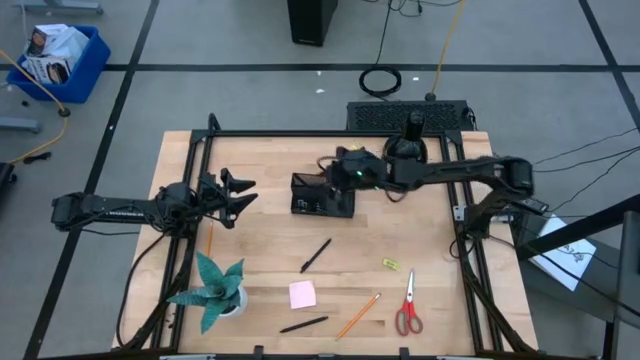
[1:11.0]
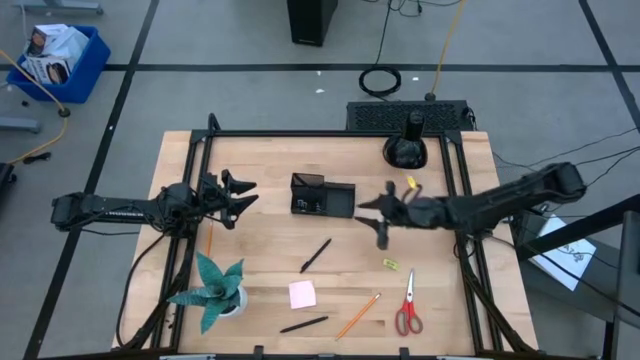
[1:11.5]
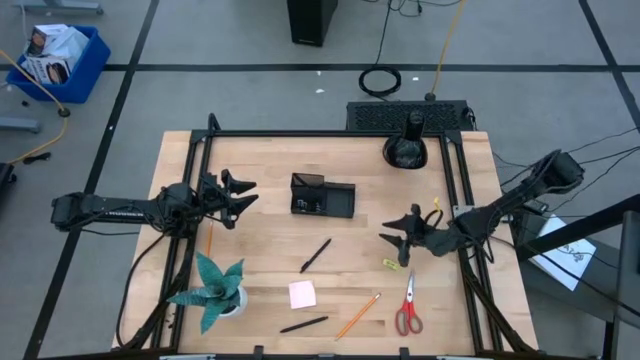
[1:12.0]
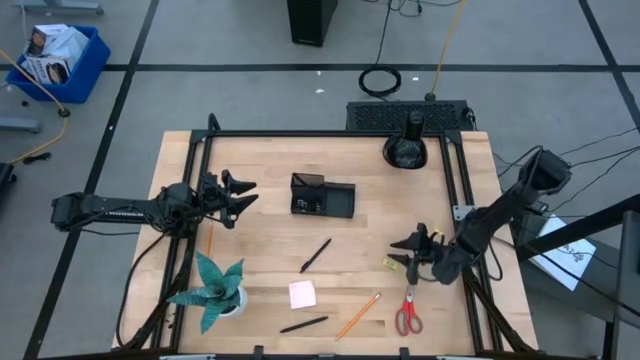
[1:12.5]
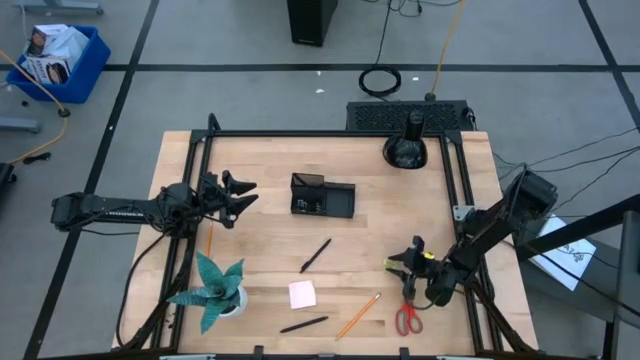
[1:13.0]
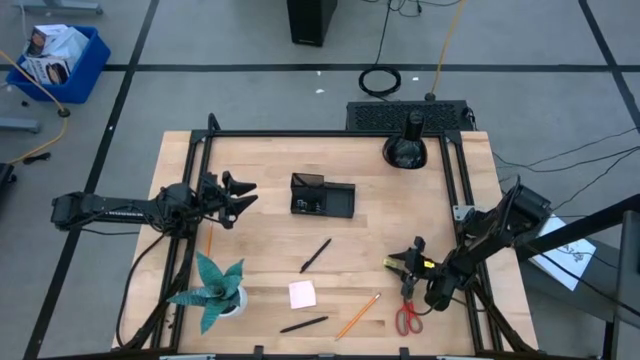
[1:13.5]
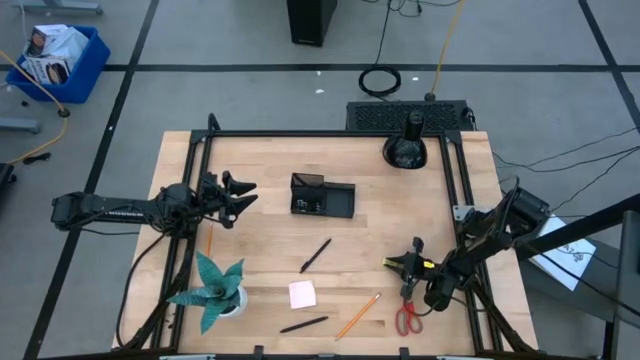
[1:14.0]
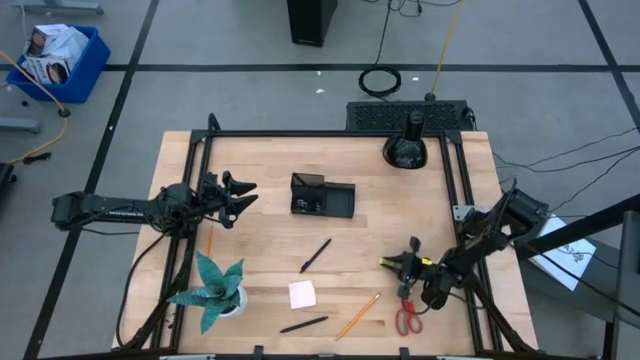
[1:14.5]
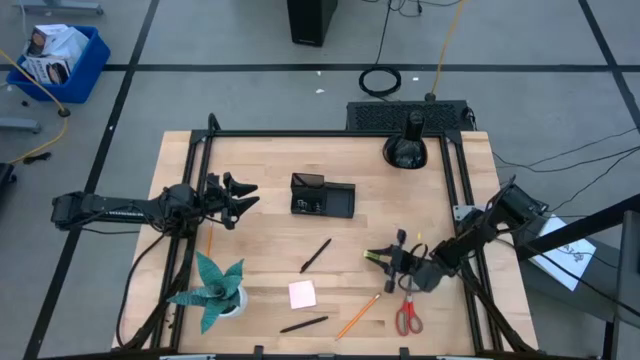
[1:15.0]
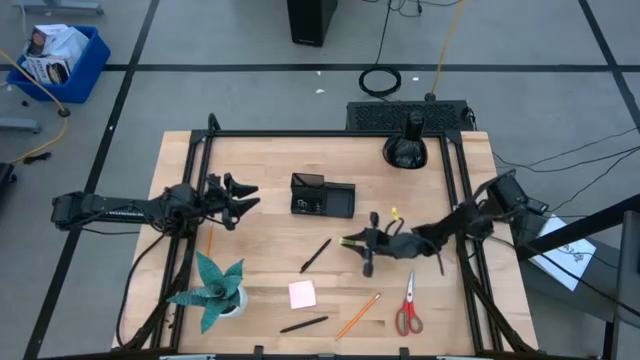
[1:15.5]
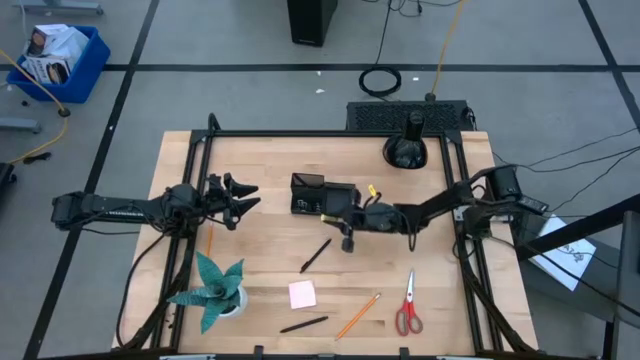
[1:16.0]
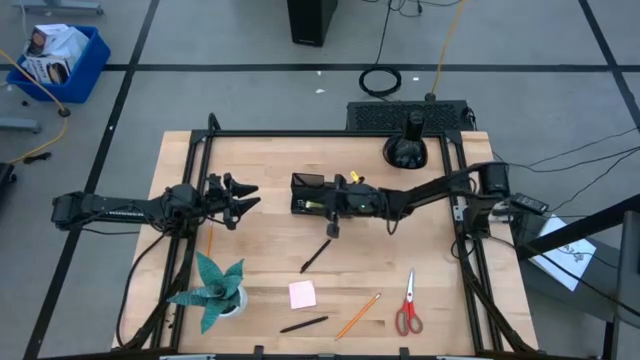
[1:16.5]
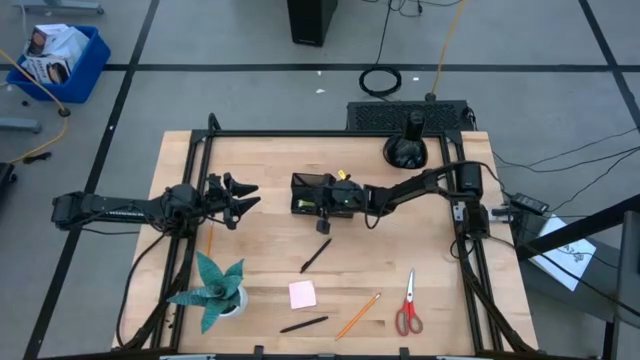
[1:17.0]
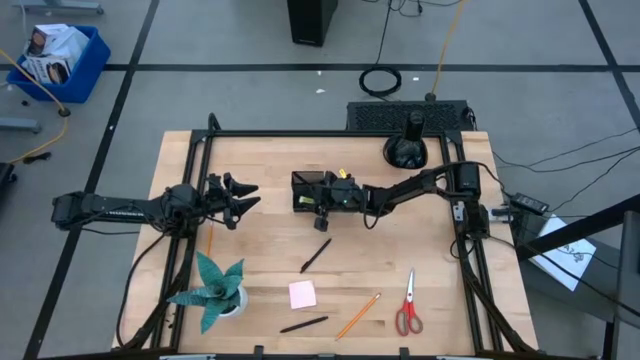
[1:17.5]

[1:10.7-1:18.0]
Task: Pick and place office supplies into organizer
Put the yellow eraser into the black desk organizer

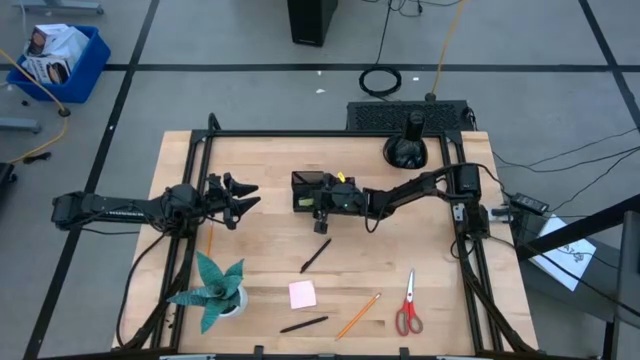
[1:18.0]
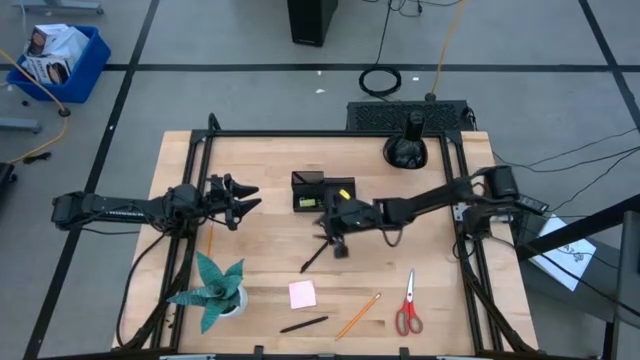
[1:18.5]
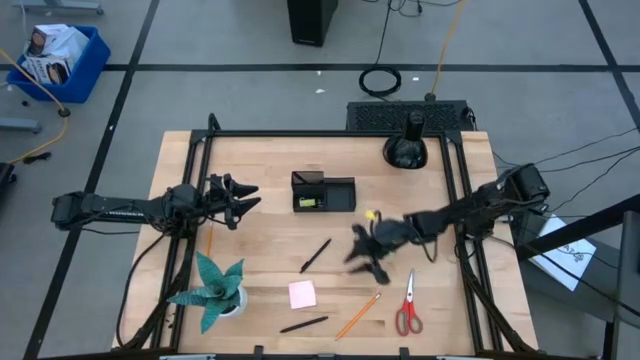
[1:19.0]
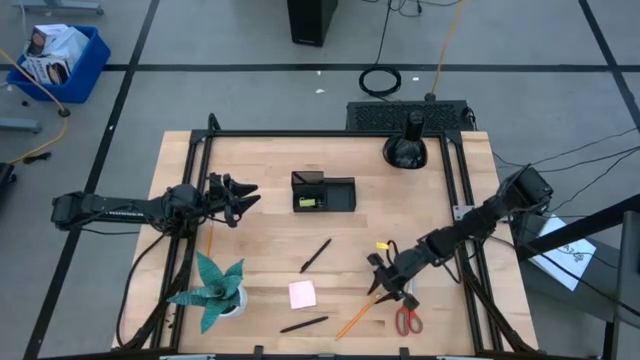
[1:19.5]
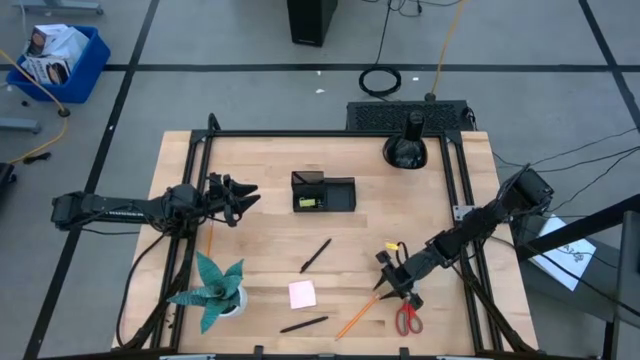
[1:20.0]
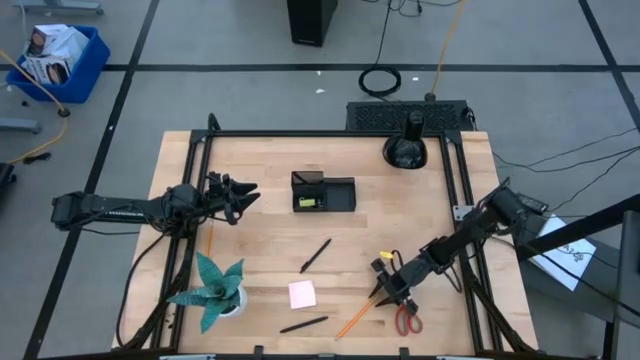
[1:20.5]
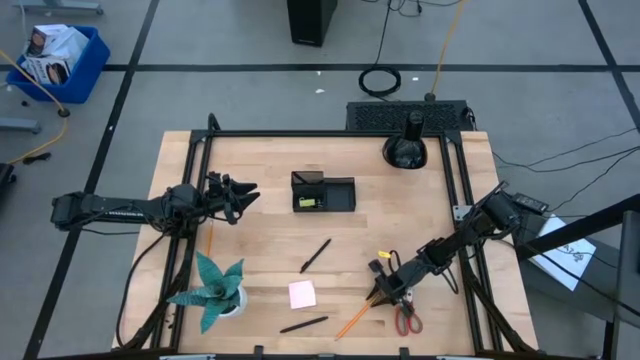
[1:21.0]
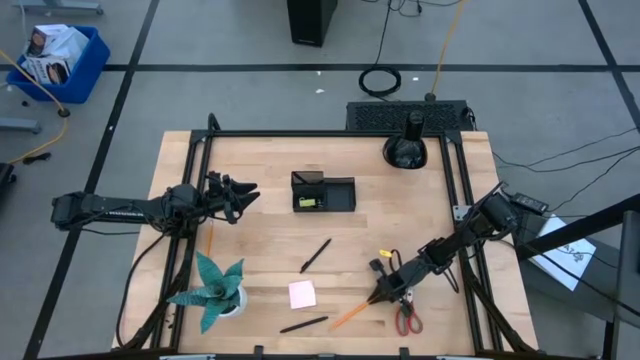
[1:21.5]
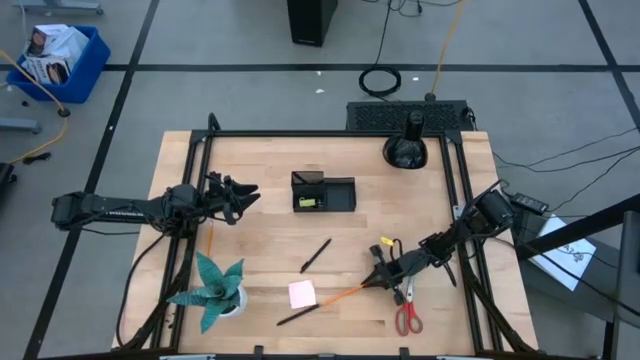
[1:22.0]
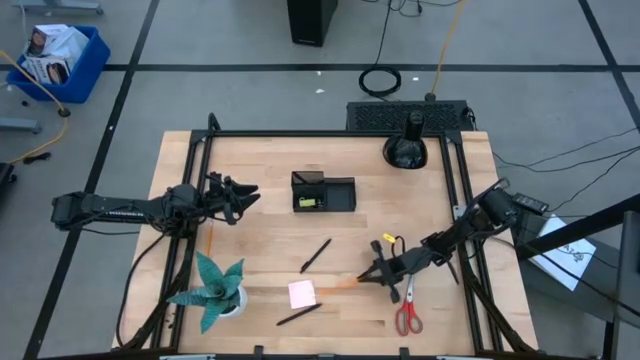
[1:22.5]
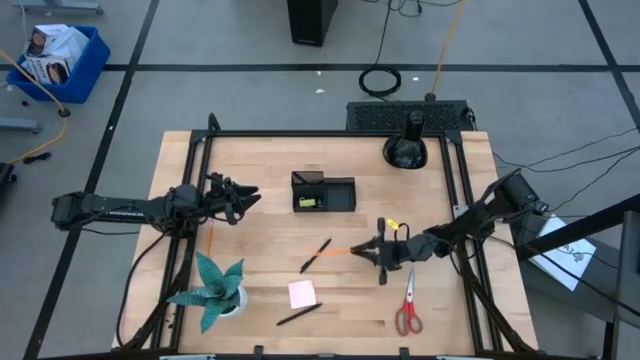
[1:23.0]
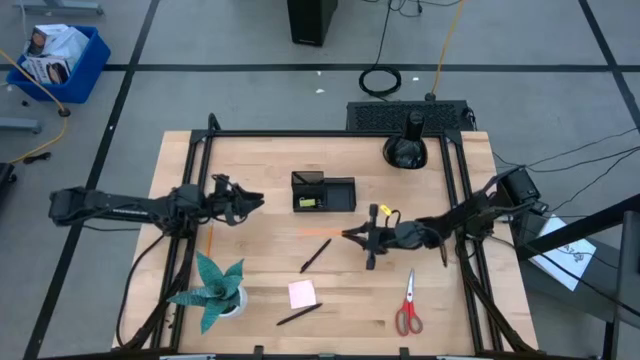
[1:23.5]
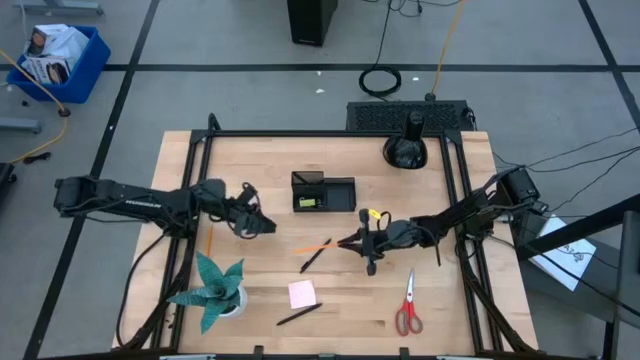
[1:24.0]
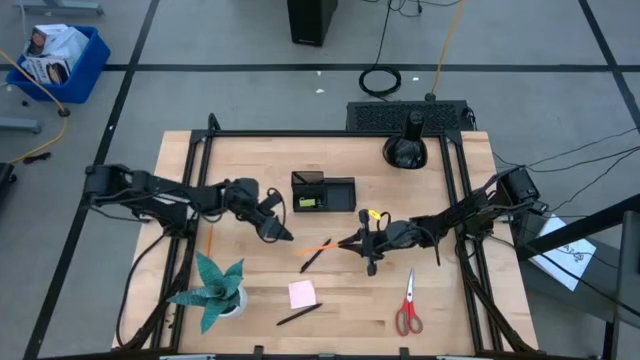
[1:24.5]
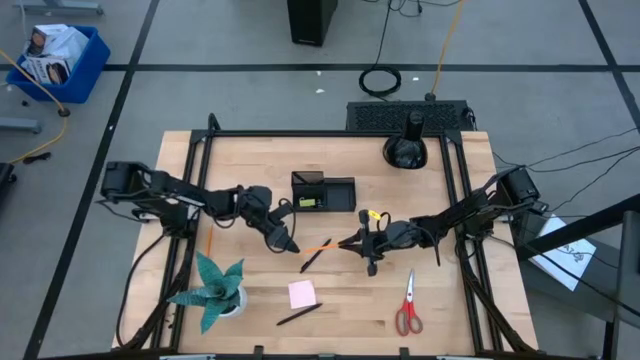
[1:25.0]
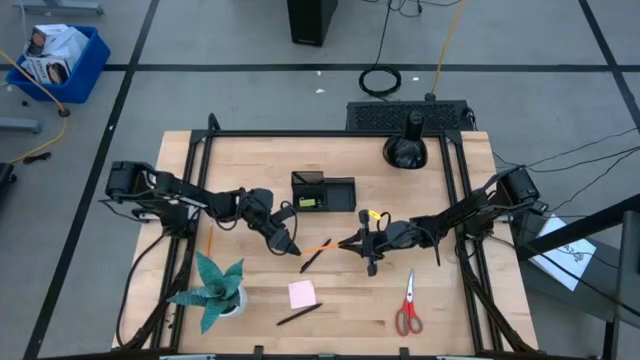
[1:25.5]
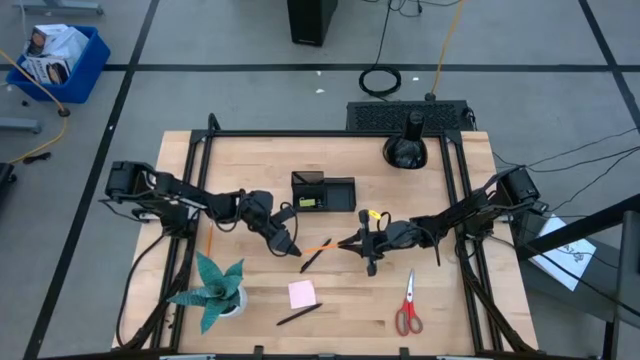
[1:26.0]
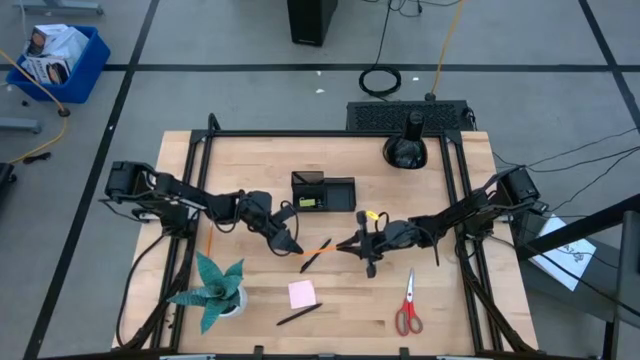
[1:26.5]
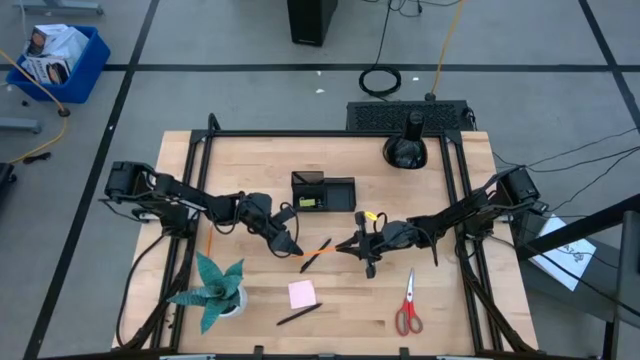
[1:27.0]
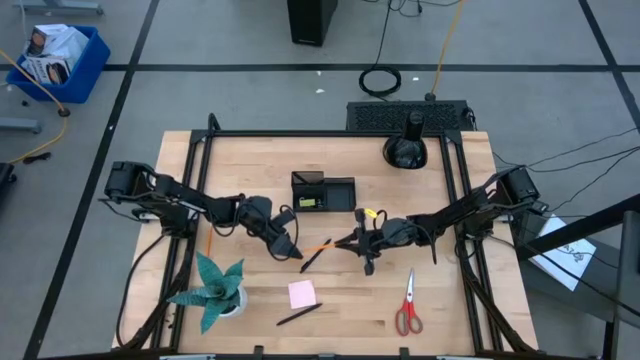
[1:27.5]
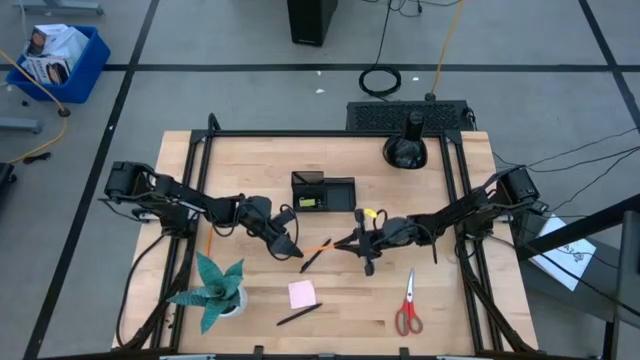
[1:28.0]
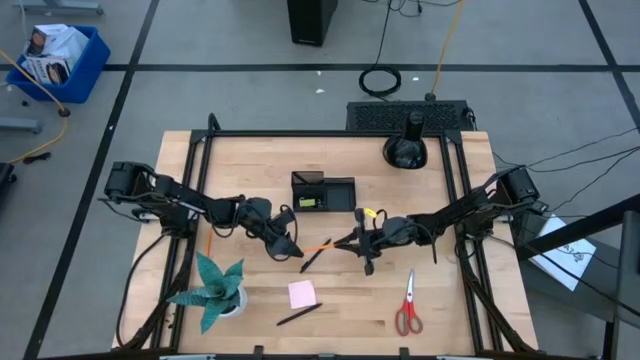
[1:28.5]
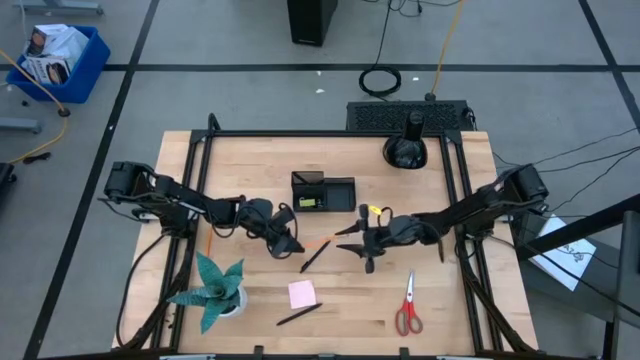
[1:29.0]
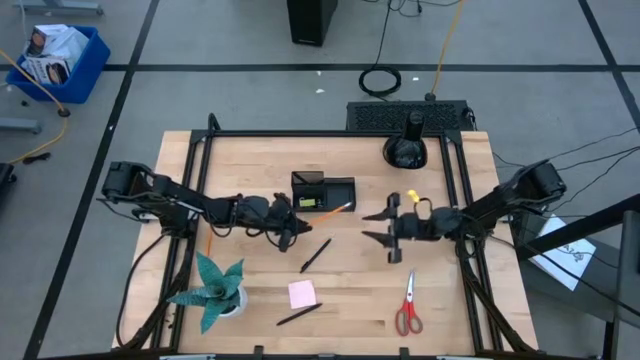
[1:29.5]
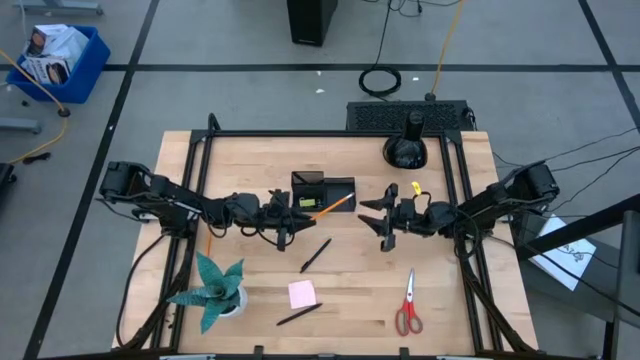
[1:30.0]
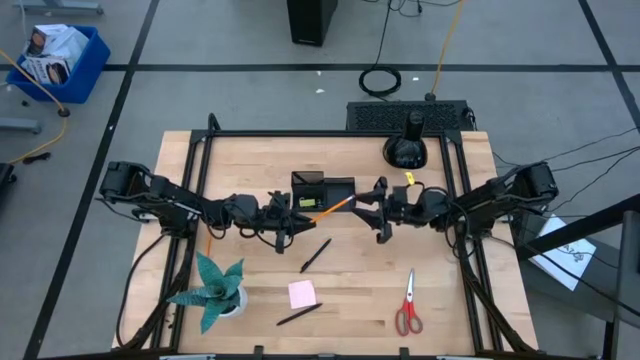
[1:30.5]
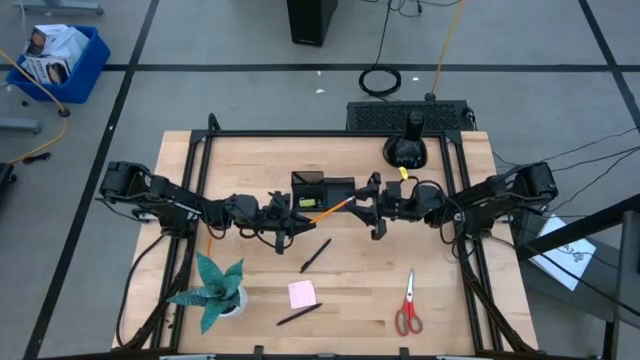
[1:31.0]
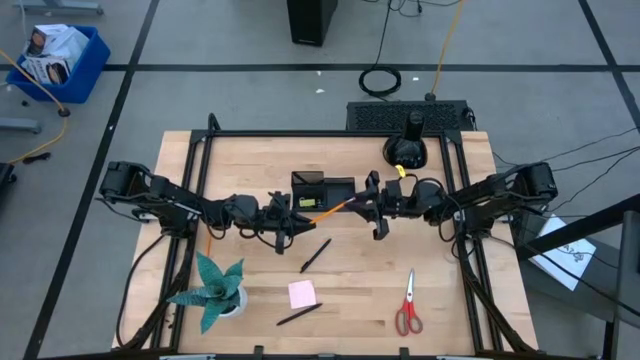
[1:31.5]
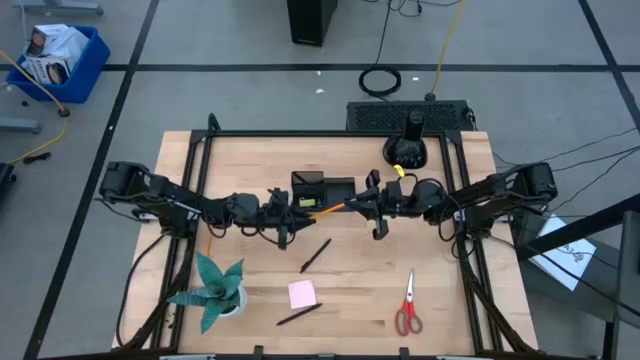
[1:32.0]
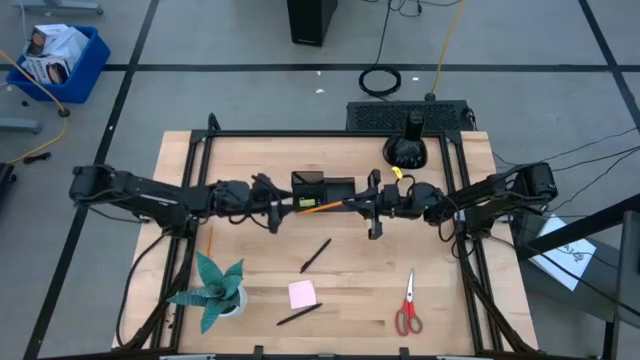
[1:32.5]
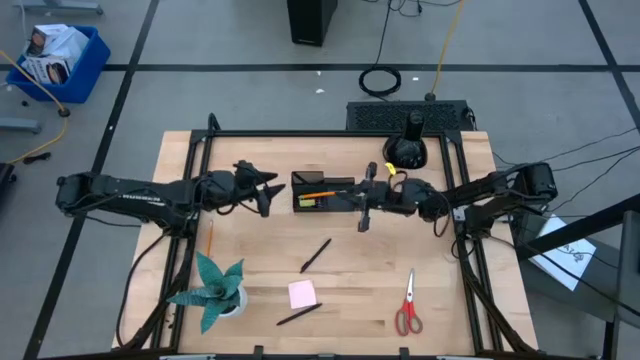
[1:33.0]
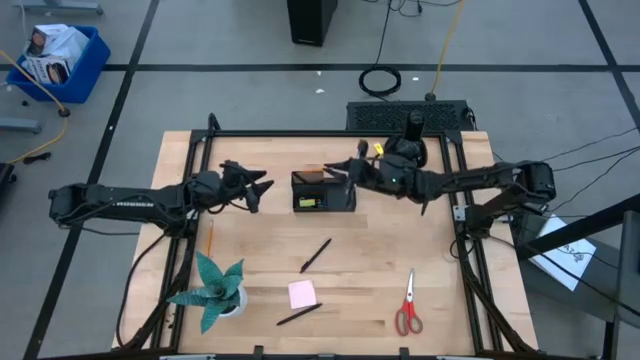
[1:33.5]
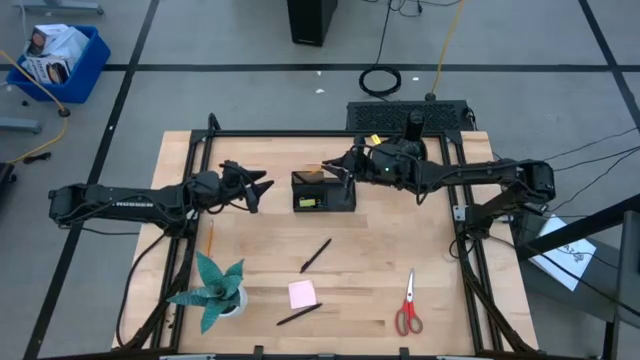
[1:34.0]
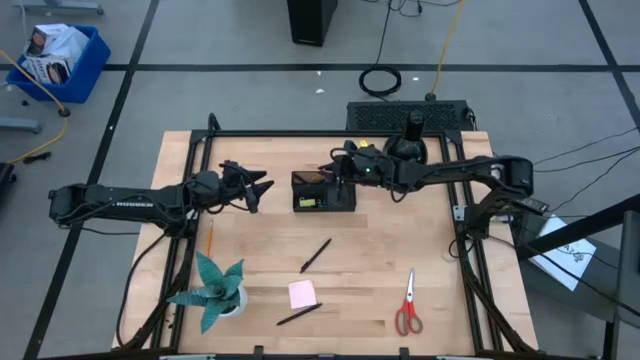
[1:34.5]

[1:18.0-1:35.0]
Put the orange pencil into the black desk organizer
